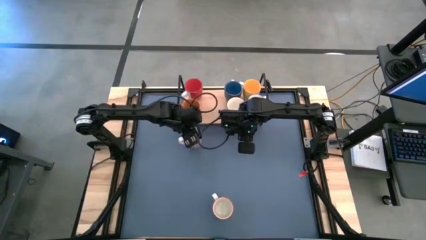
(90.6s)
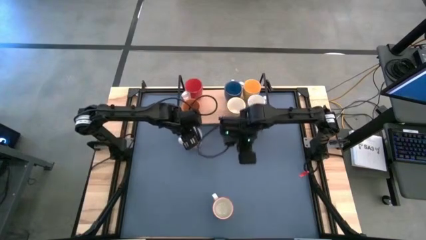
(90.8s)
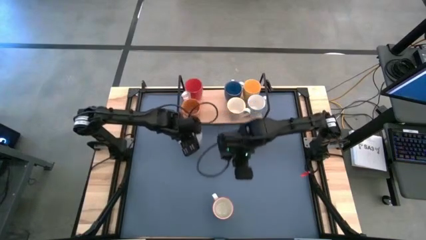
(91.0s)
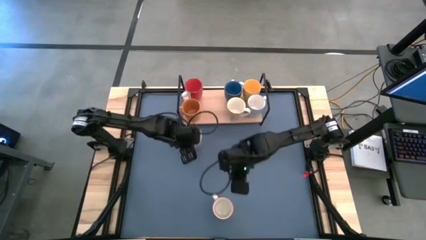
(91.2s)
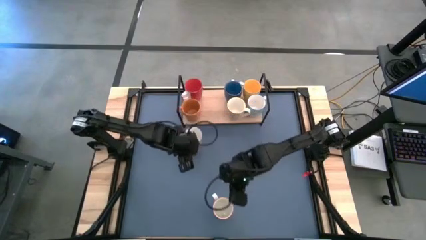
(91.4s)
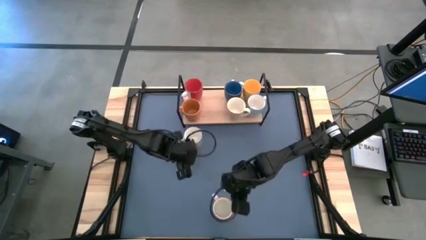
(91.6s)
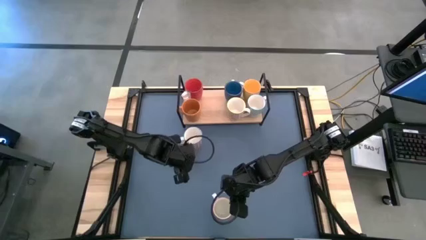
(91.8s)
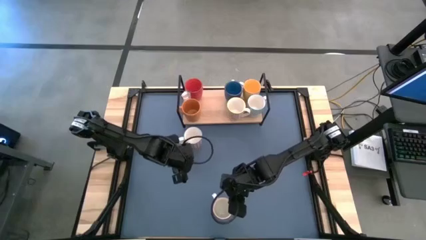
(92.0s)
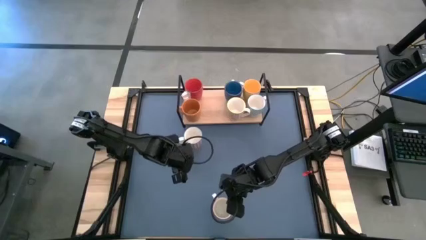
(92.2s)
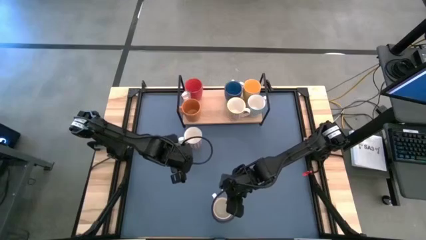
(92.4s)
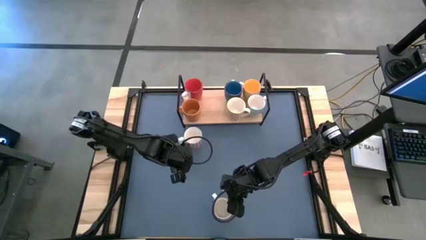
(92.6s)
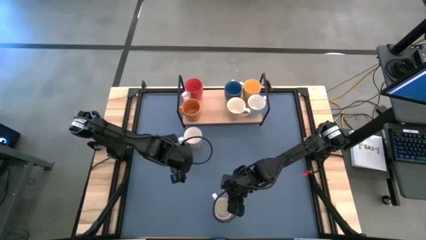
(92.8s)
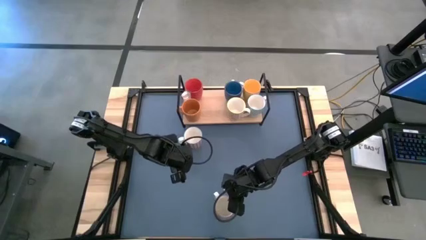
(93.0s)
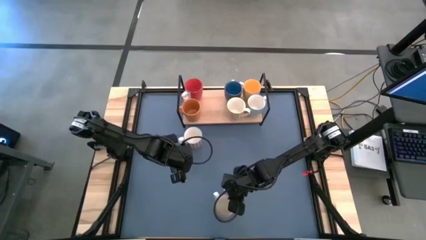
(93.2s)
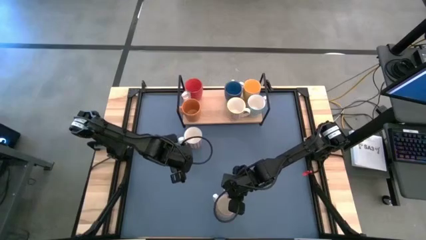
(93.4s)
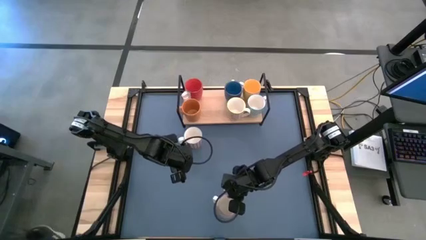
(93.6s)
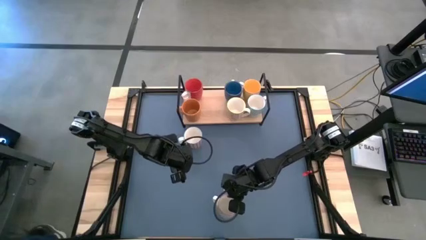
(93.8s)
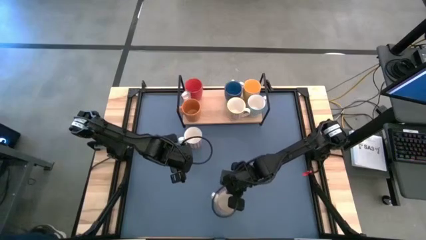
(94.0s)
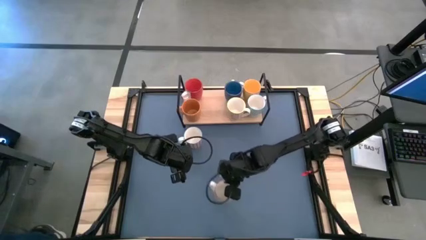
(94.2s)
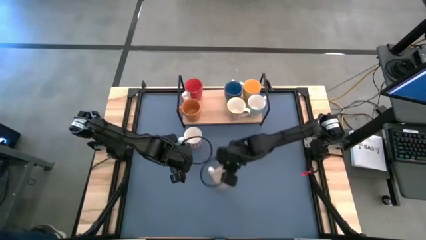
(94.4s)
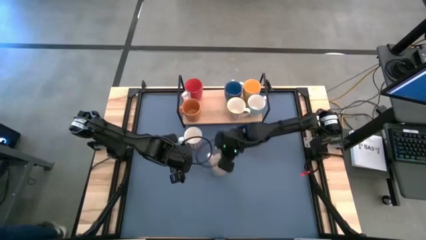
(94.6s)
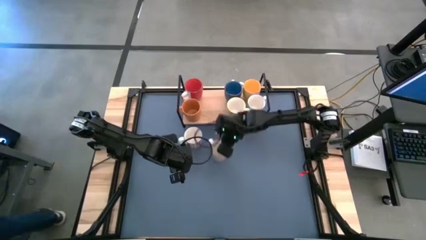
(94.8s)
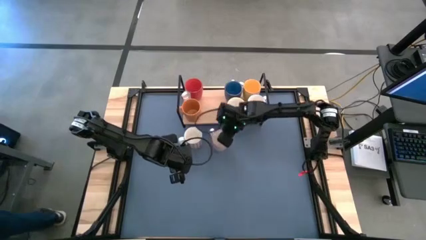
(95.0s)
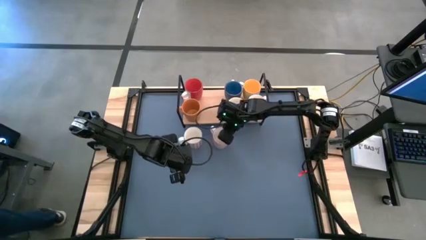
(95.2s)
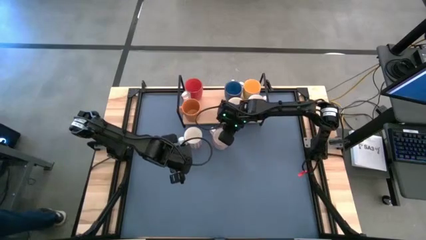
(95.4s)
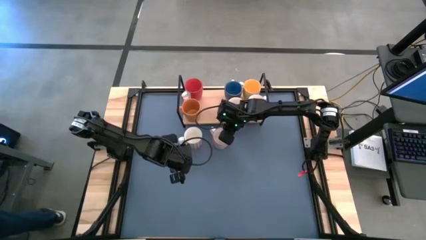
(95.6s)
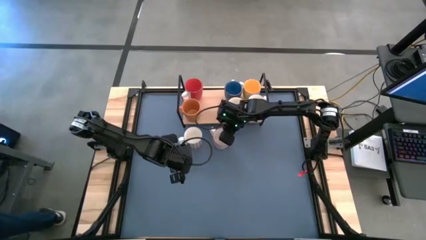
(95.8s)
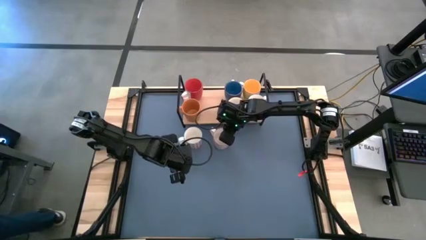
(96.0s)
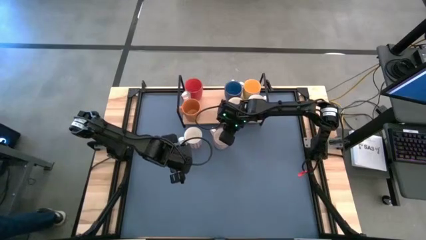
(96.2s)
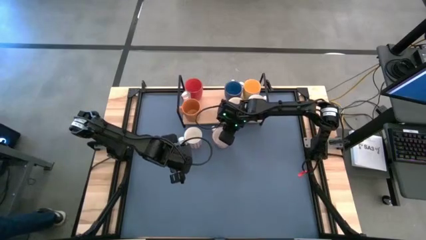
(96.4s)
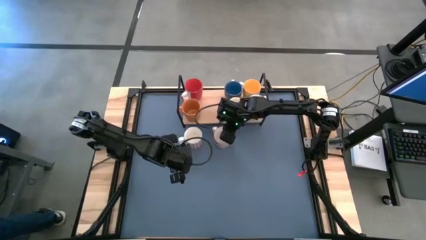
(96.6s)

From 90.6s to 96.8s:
Task: Place coffee mugs
Move the gray cup to the center of the table

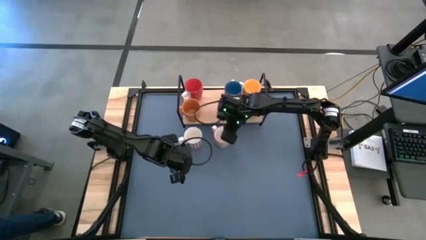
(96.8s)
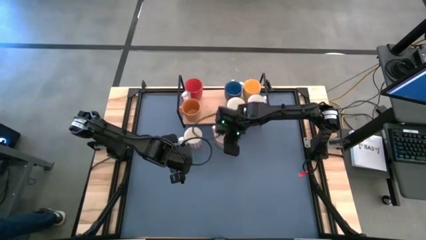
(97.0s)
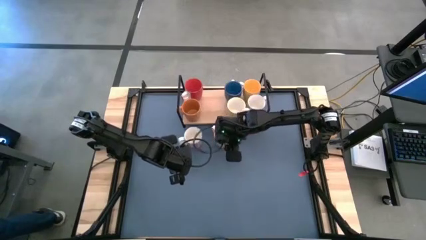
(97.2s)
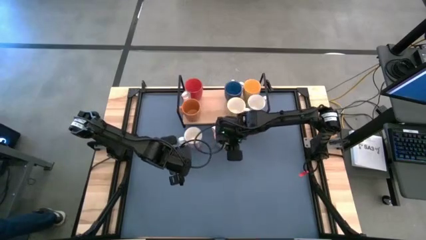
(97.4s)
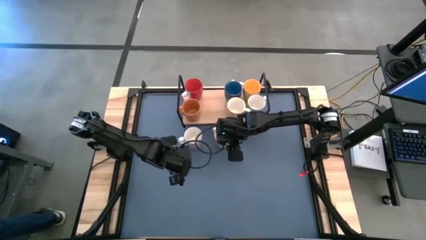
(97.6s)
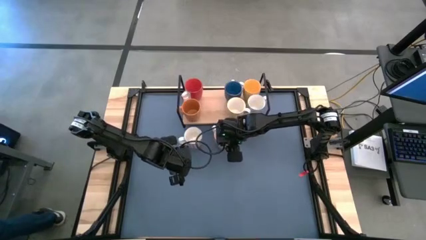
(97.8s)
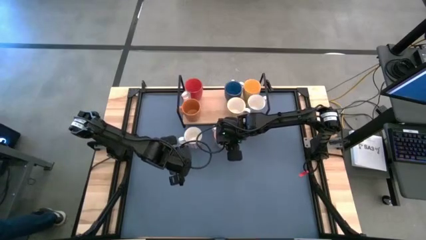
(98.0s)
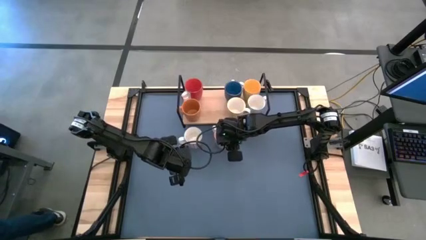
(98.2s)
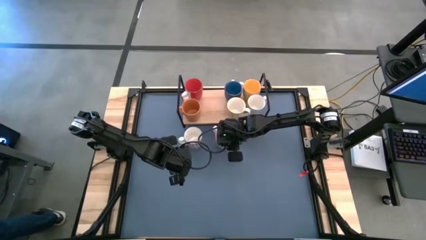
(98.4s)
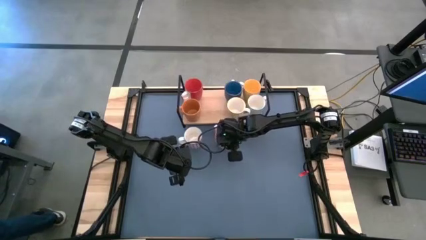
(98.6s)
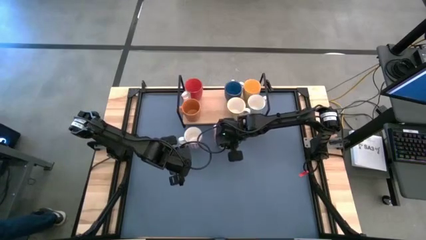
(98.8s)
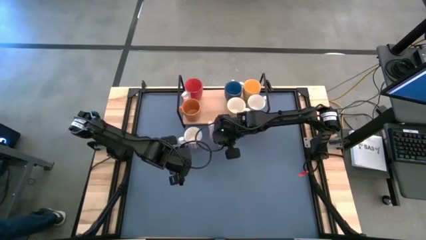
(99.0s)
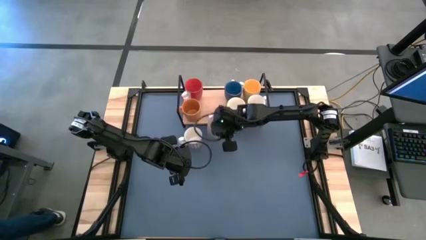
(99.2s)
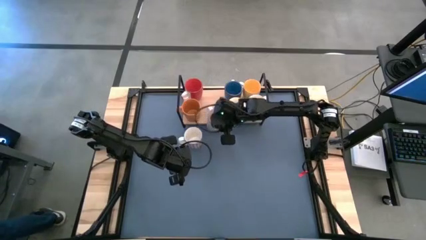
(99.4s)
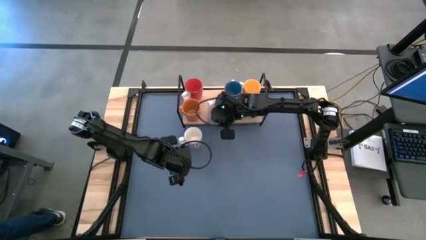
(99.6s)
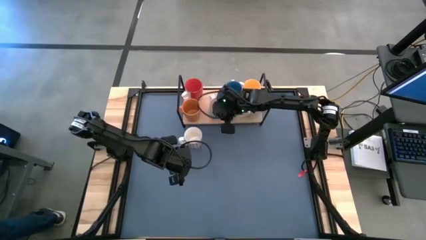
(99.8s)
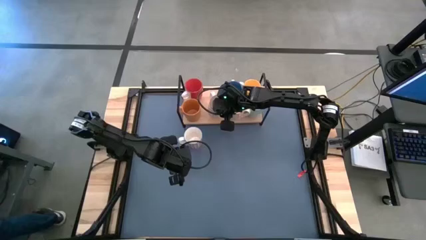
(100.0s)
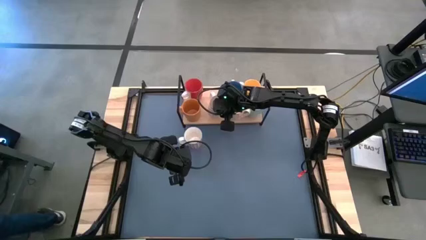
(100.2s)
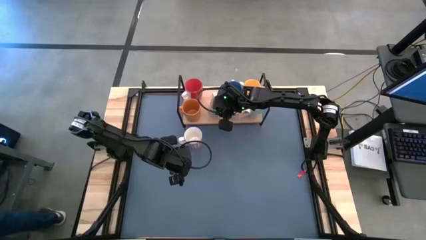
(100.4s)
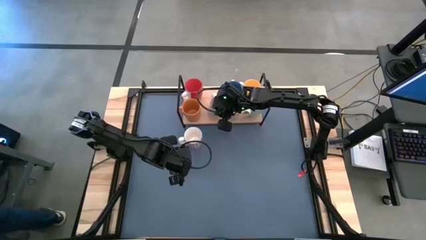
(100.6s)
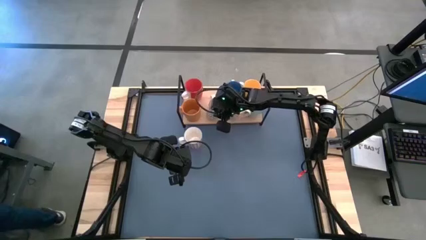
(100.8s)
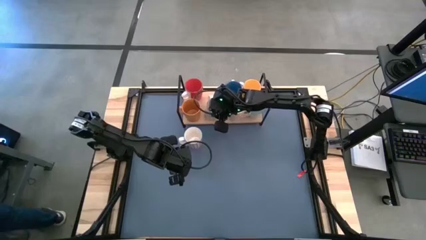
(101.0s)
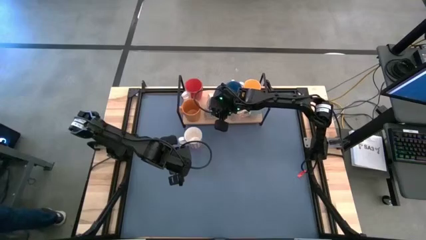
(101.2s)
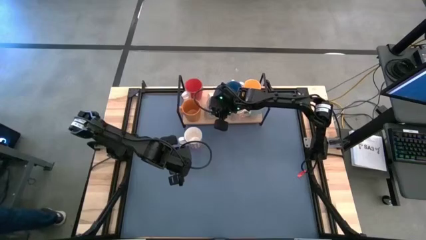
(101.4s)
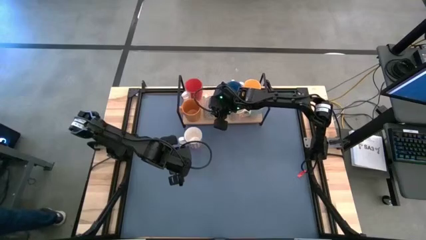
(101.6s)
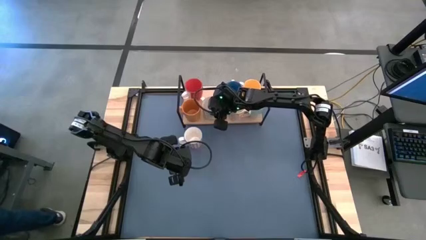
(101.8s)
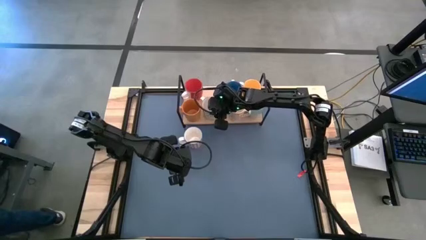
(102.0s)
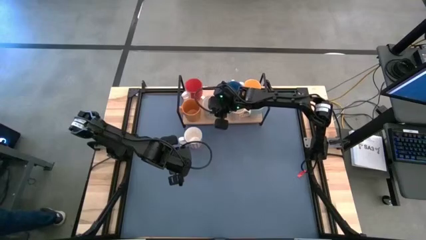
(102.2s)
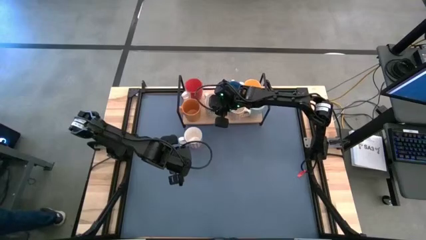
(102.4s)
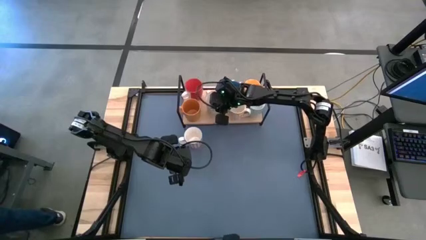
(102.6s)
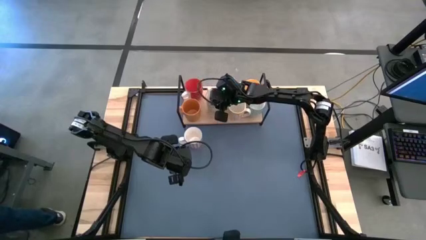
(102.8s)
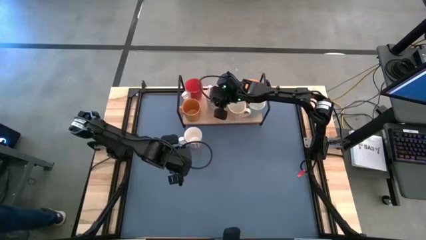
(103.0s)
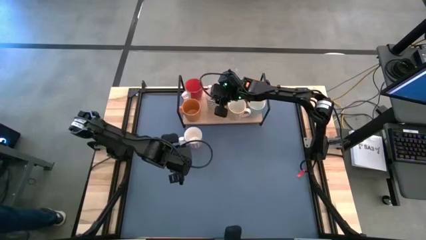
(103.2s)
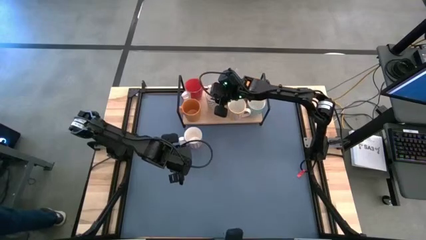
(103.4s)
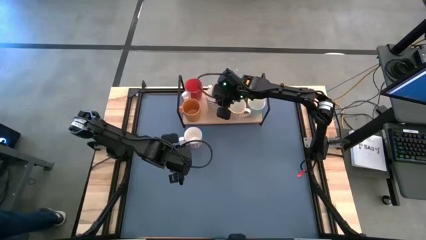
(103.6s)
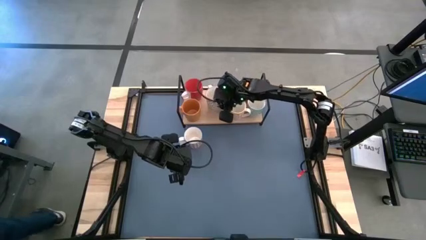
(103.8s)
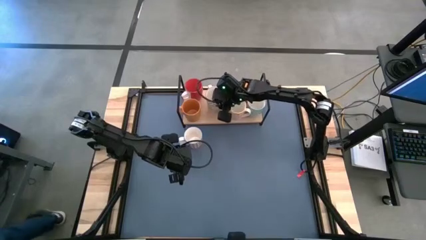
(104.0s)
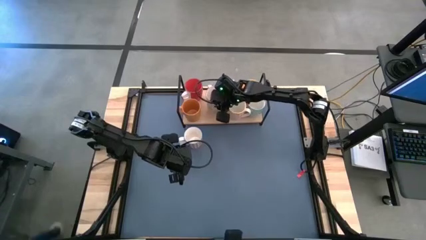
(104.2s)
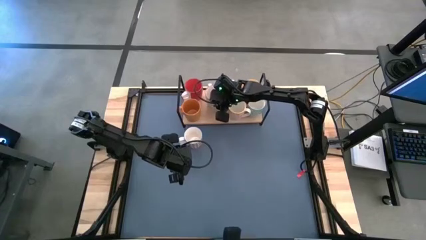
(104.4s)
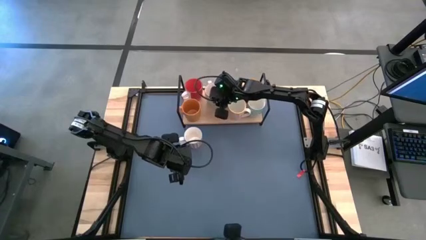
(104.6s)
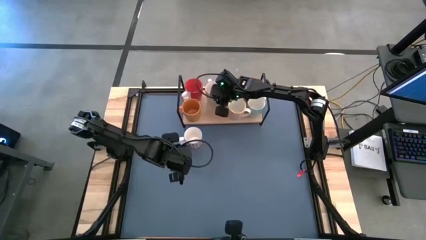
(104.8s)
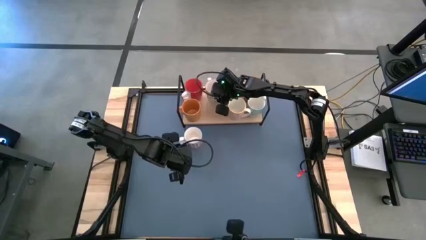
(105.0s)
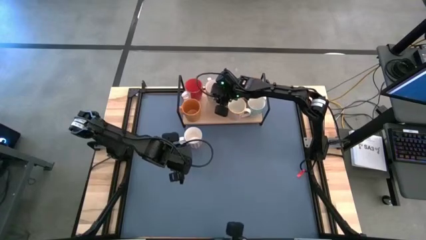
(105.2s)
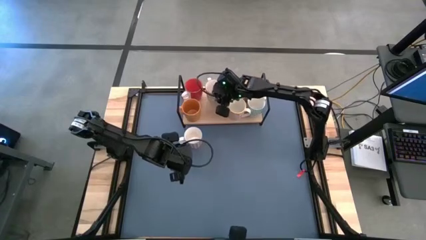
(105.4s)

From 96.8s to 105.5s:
Put the gray cup on the shelf

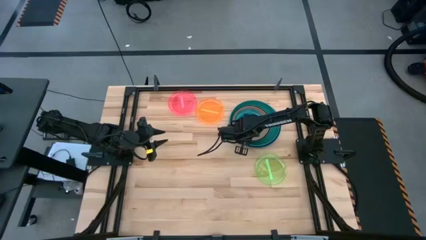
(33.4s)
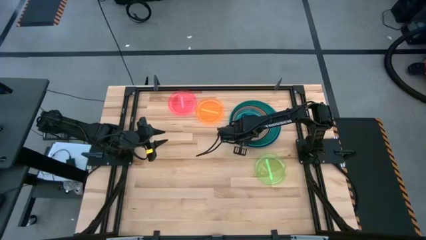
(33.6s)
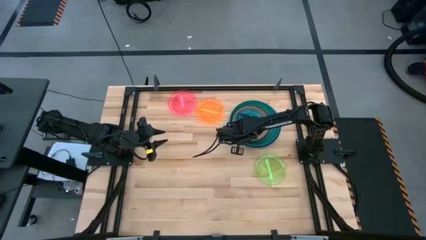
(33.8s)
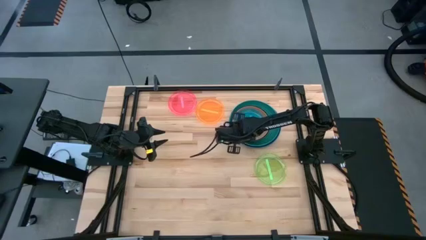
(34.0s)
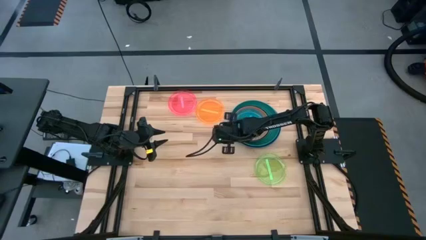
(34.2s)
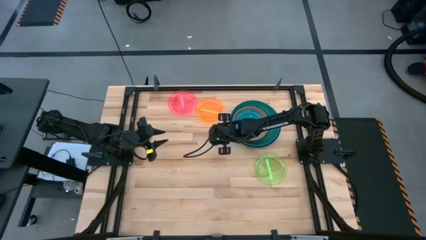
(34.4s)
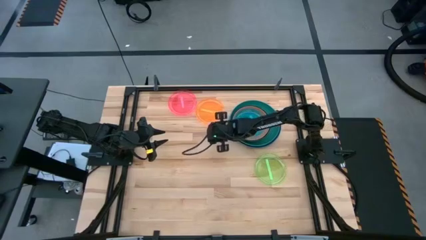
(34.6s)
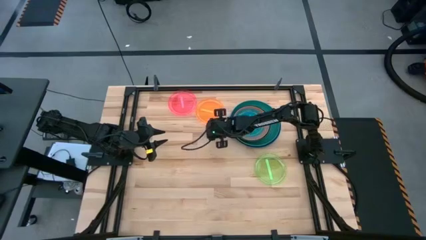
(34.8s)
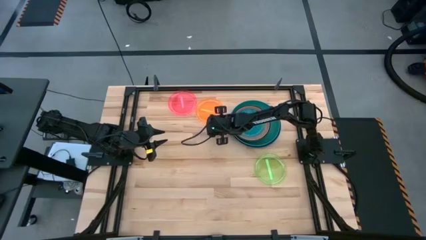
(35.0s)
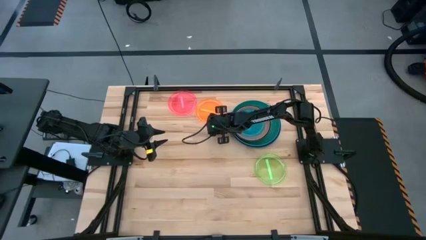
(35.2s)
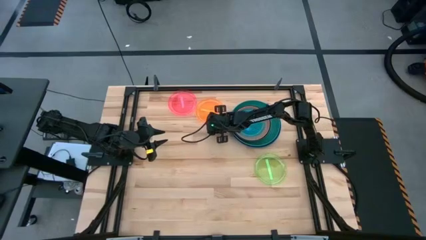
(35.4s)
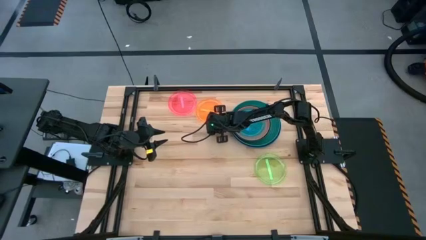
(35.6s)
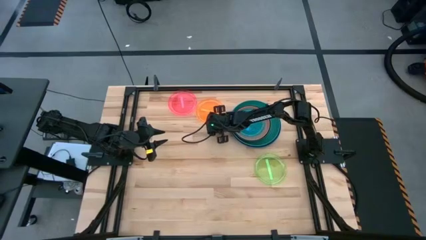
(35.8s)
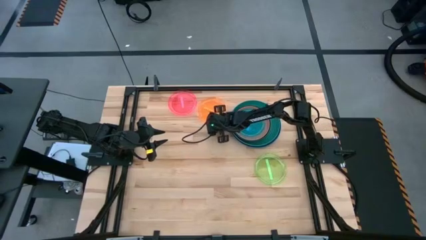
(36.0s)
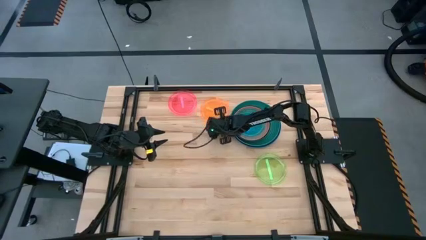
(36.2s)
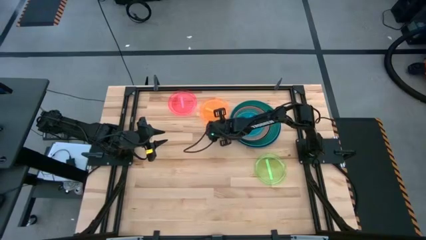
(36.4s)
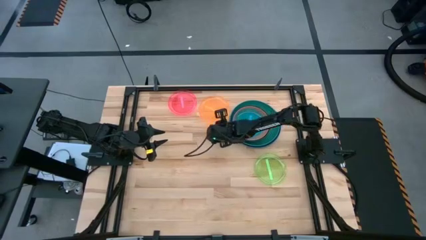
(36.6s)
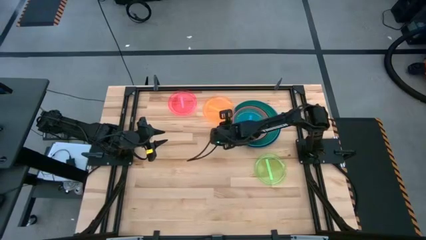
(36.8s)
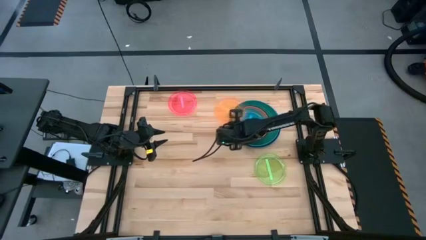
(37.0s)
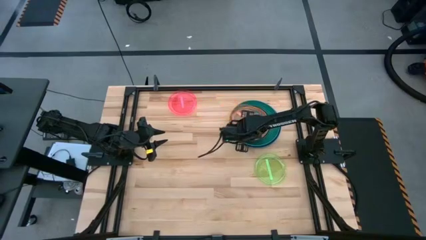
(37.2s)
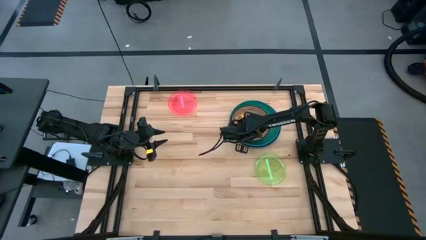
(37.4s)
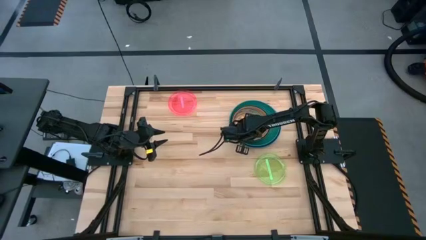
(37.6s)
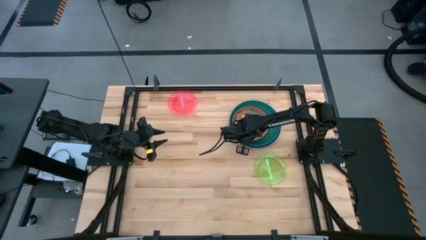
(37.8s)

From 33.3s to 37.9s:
Task: Stack plastic plates
Stack the orange plate on the light blue plate
